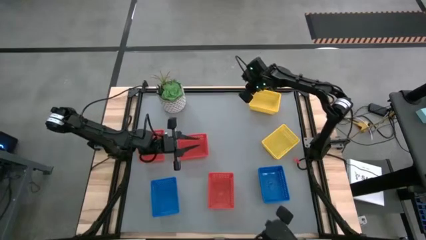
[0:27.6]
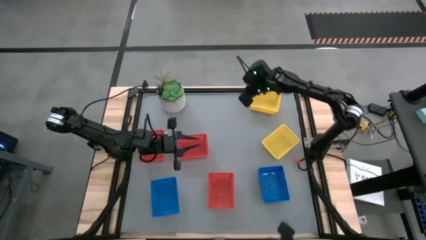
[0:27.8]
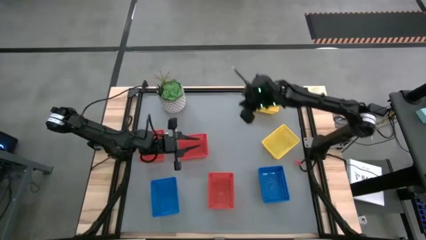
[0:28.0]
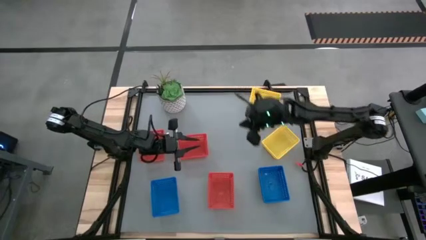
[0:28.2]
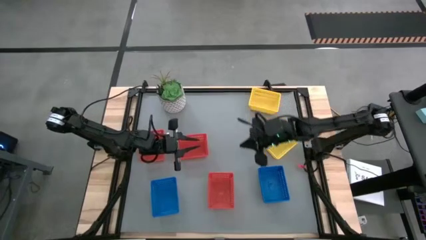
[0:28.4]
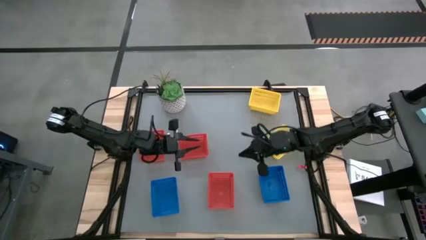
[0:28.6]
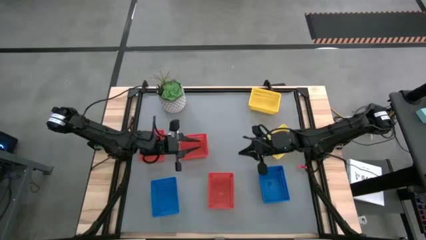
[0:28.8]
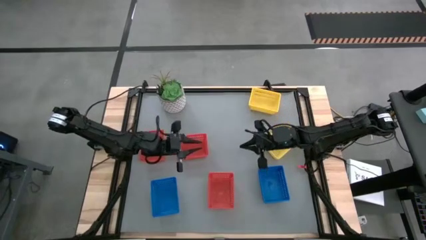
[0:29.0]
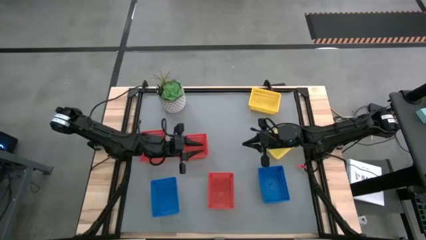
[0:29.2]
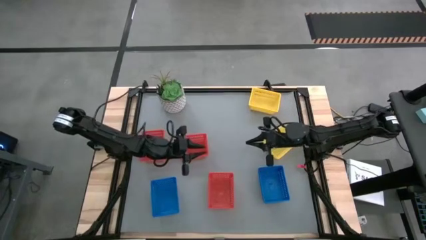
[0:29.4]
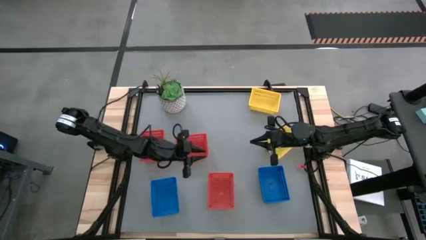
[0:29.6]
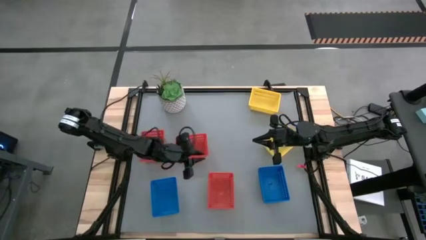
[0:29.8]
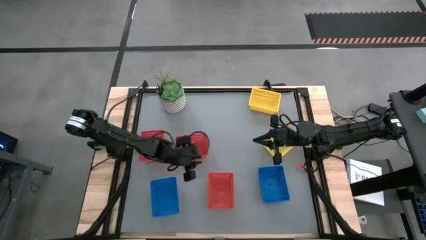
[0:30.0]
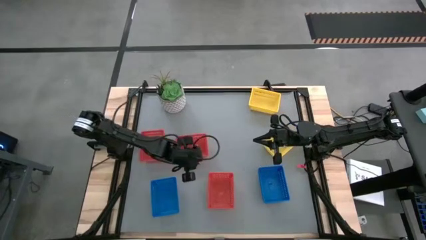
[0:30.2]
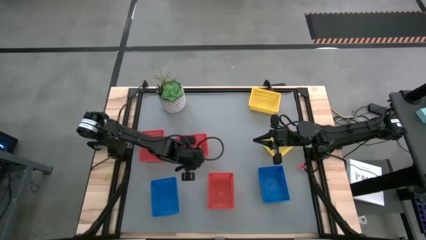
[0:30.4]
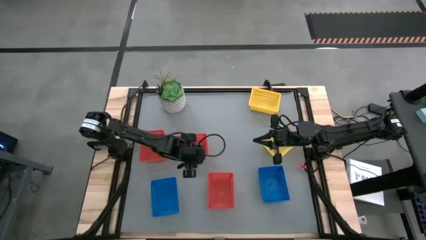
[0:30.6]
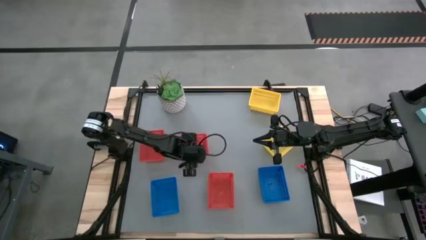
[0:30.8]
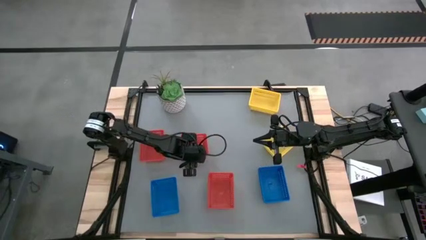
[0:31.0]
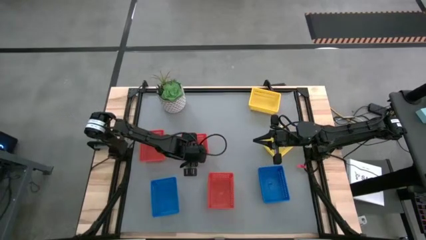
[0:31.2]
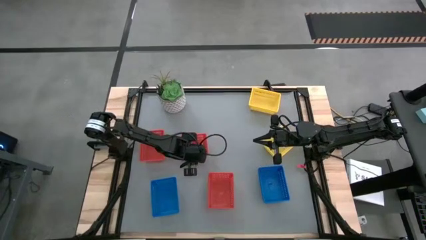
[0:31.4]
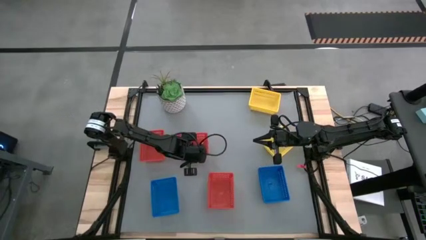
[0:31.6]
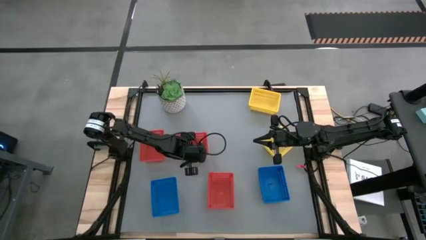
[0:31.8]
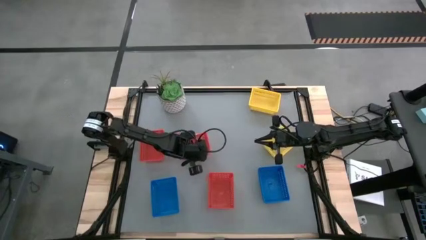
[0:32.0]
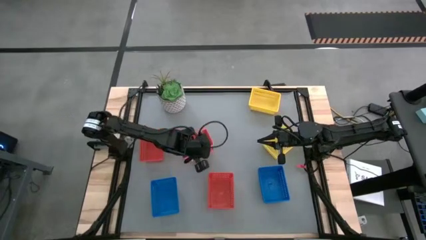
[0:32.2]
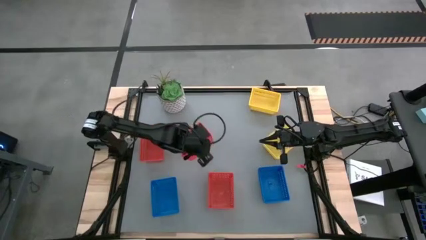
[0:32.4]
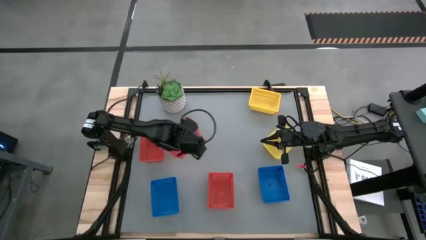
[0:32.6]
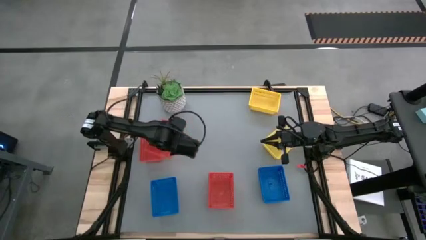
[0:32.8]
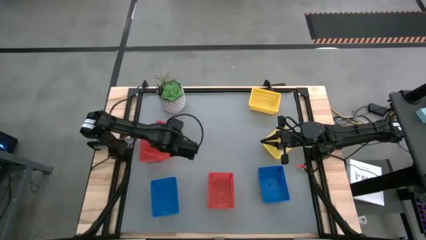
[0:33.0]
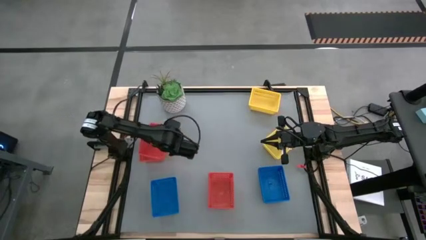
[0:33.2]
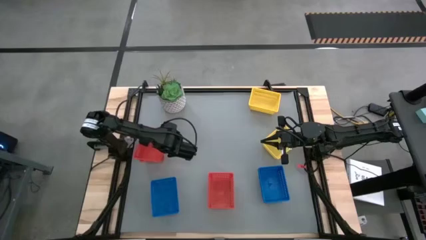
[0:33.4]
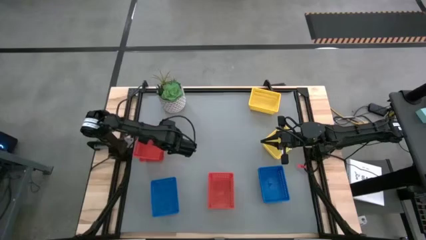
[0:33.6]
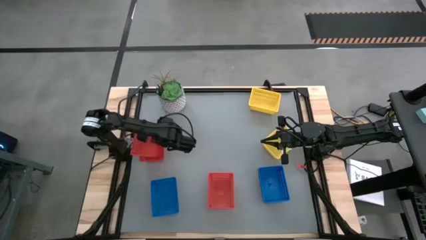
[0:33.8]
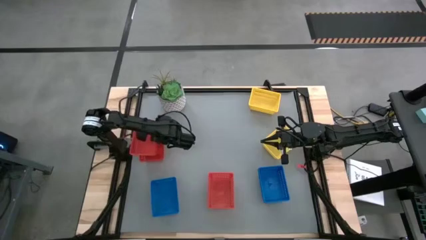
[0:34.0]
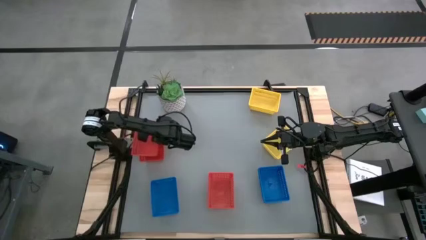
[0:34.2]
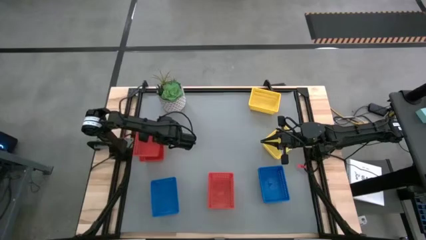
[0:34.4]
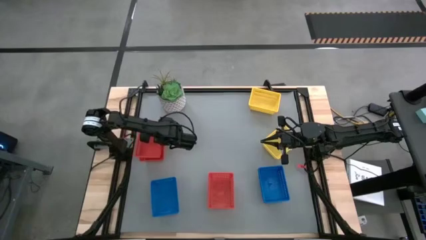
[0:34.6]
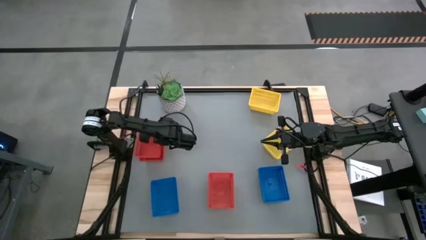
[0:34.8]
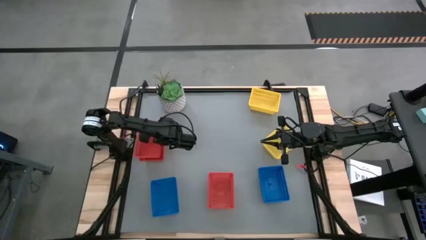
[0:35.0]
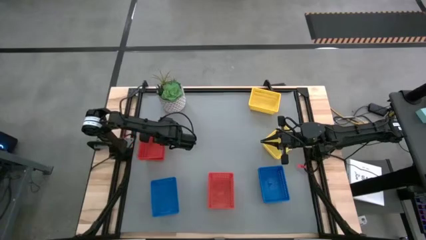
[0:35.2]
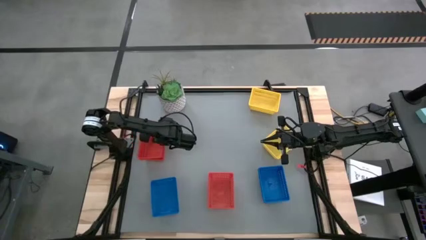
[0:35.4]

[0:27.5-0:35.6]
Stack the top right red bin on top of the top left red bin

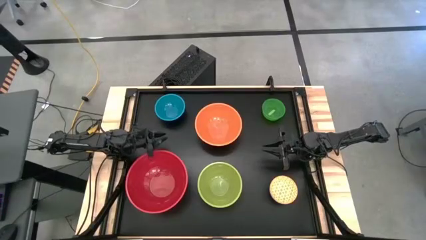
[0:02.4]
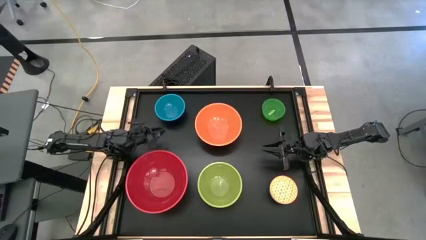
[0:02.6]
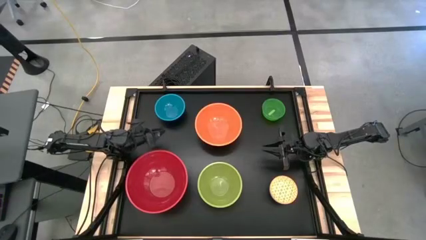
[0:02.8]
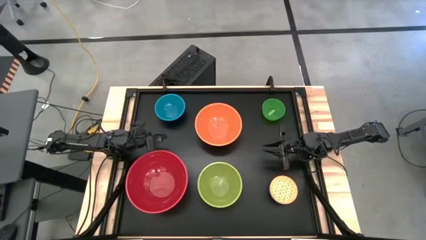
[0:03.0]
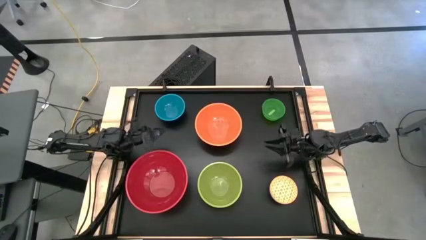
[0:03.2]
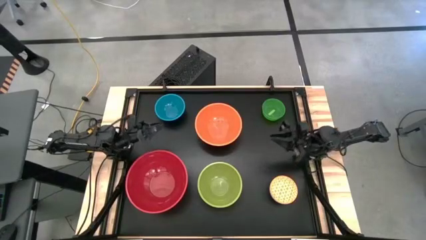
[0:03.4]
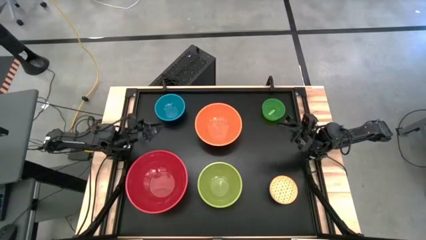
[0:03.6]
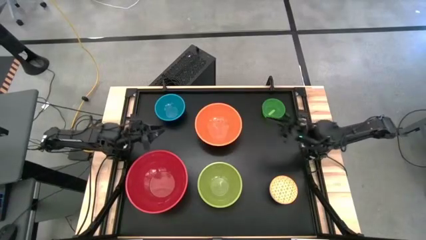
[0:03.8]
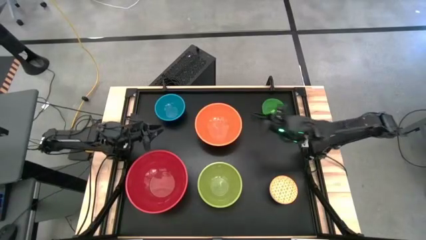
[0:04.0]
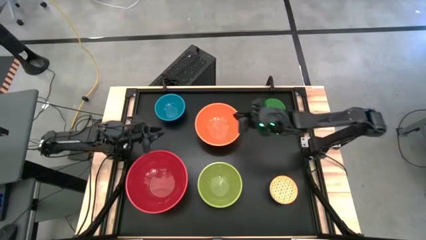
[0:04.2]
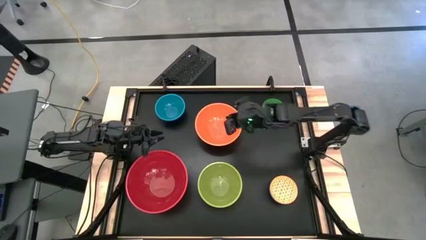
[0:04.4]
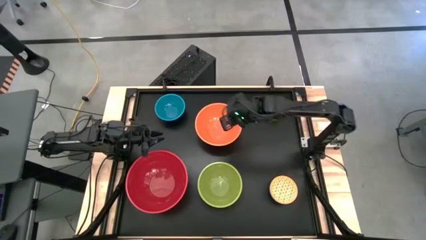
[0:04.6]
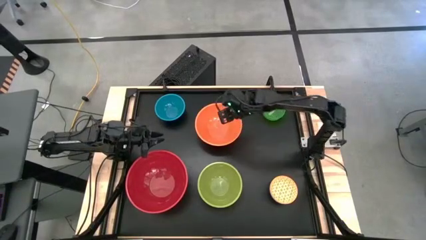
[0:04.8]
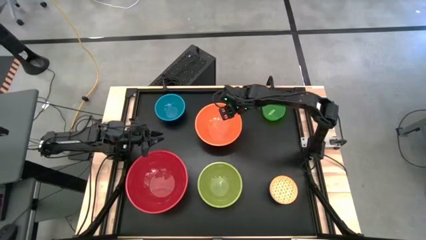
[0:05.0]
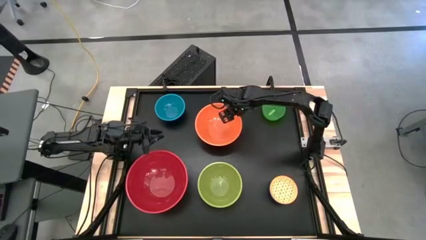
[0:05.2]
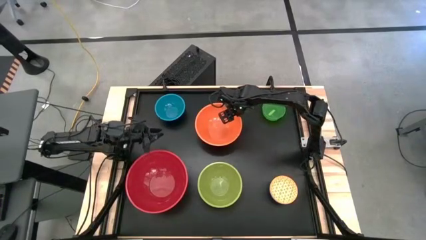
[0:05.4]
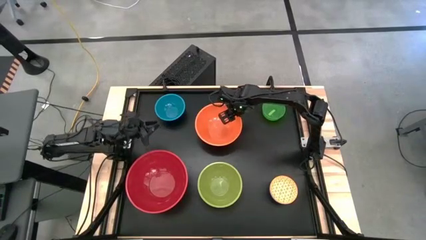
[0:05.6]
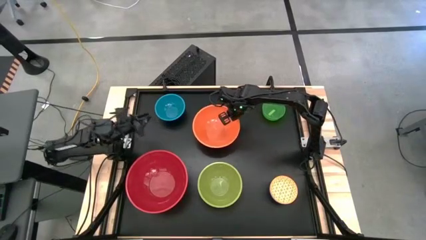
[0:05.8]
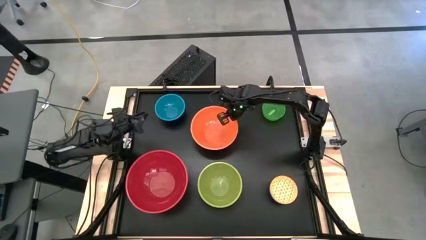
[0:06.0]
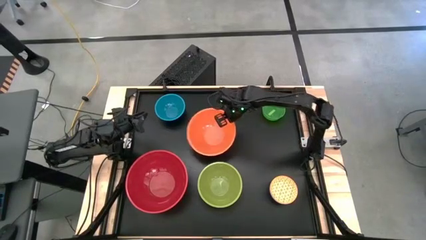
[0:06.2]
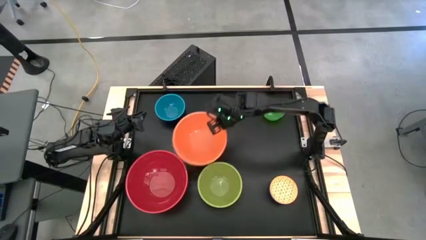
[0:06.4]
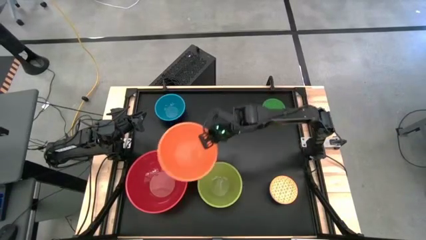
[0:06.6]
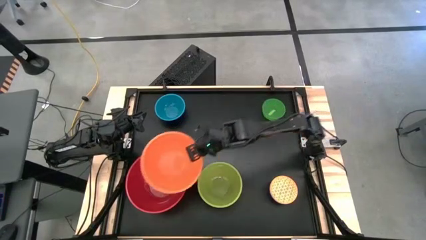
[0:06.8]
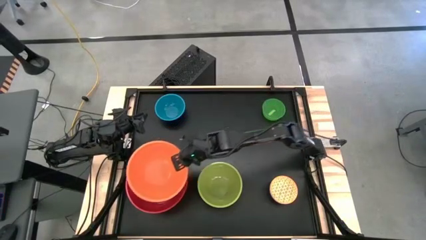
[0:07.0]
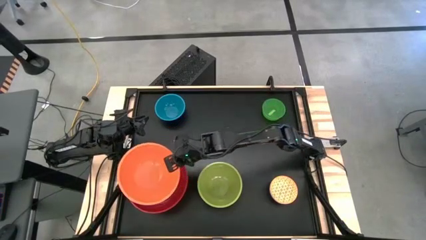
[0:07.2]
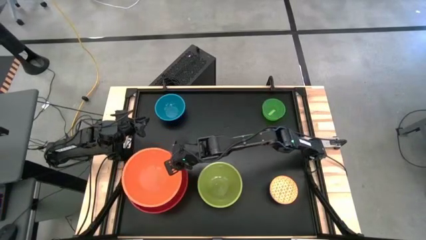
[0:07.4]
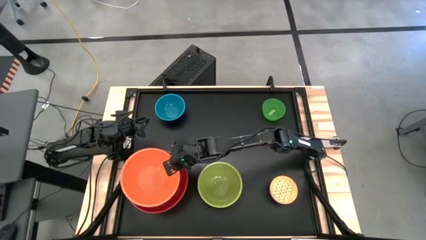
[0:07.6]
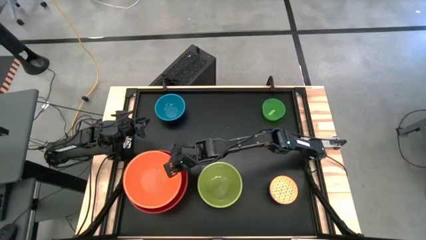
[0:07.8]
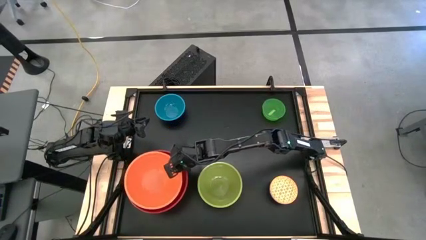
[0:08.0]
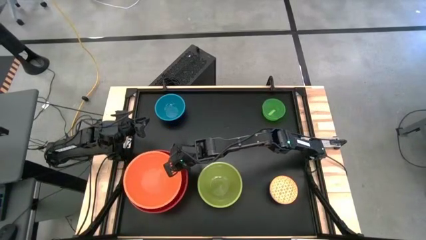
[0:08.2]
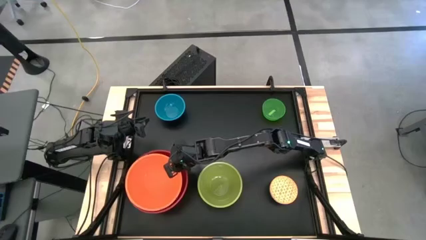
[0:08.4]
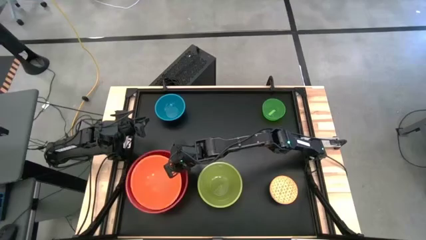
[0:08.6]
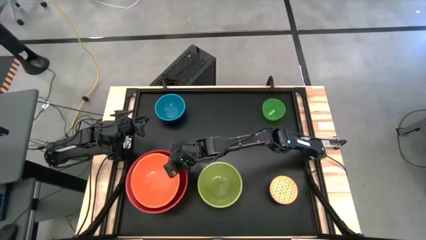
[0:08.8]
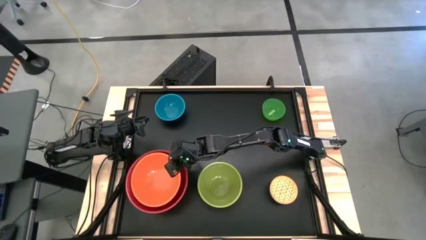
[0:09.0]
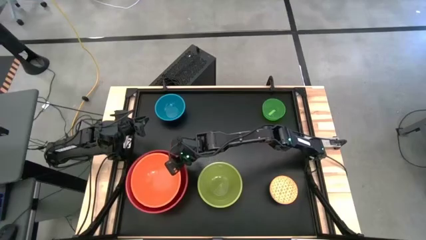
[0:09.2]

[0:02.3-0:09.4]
Stack the orange bowl on top of the red bowl
